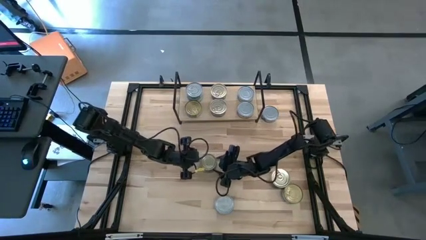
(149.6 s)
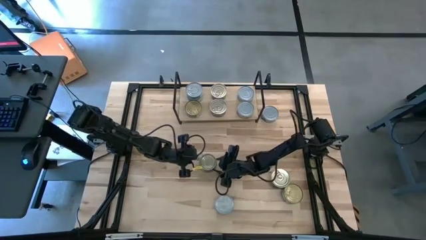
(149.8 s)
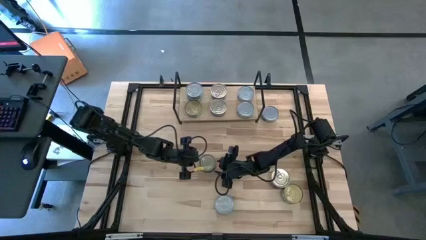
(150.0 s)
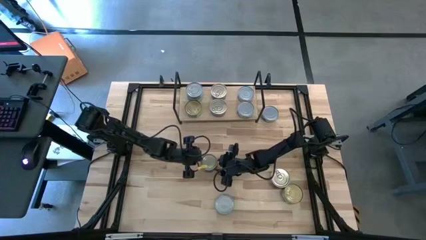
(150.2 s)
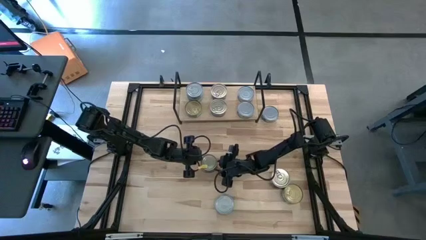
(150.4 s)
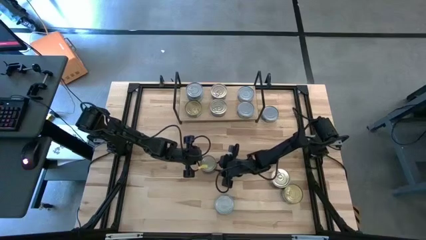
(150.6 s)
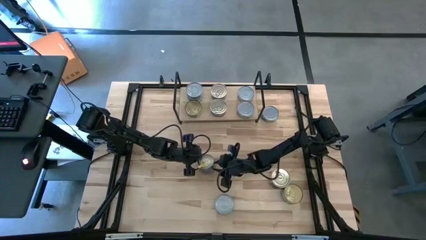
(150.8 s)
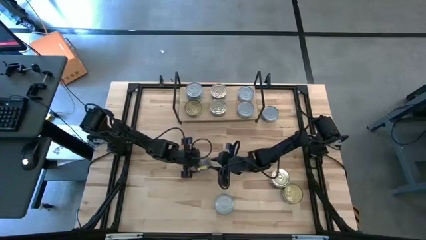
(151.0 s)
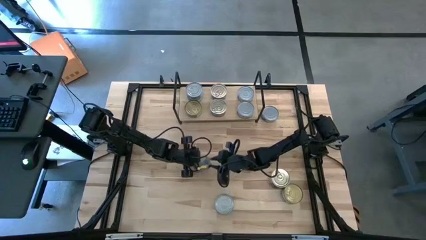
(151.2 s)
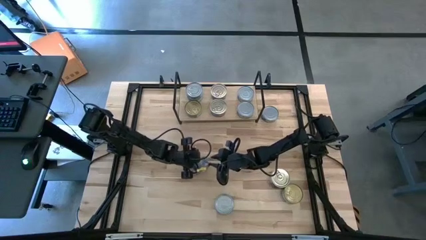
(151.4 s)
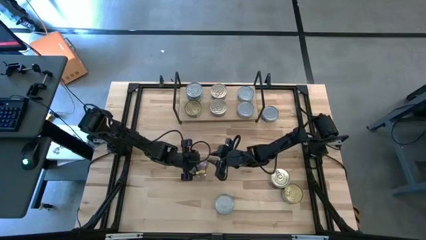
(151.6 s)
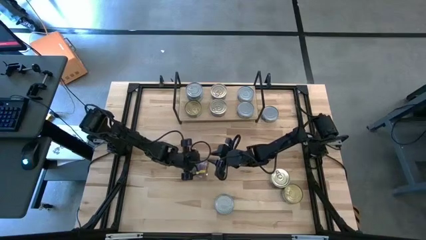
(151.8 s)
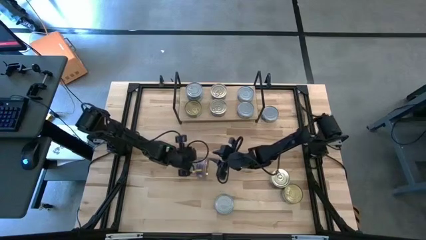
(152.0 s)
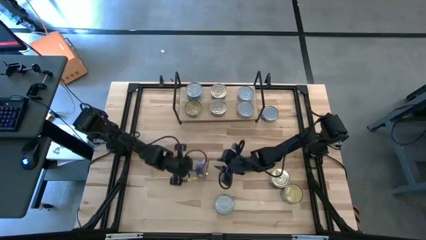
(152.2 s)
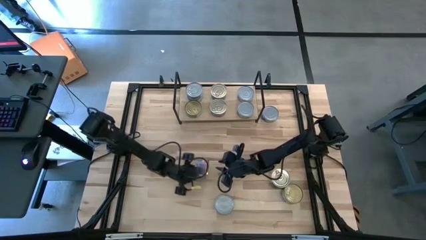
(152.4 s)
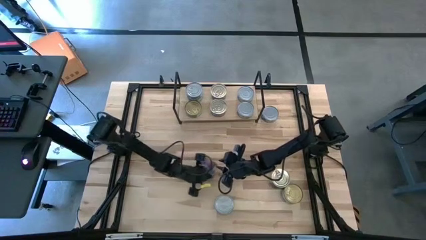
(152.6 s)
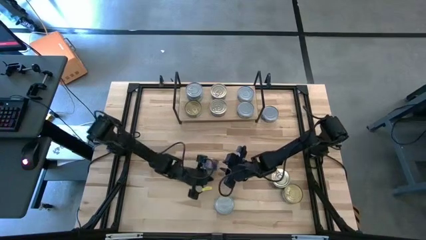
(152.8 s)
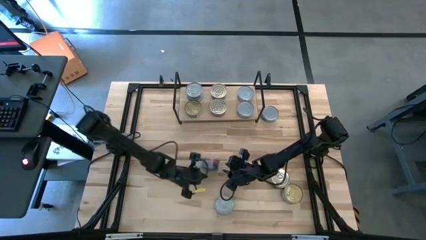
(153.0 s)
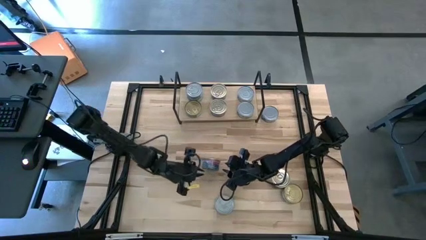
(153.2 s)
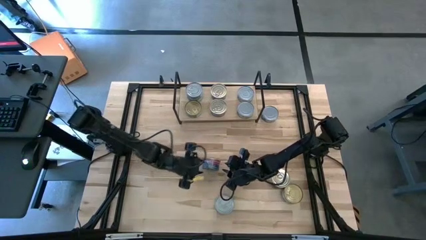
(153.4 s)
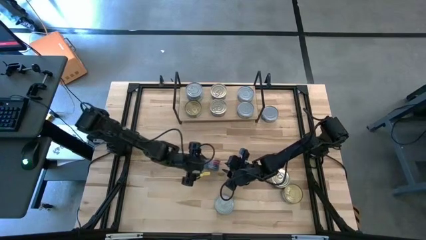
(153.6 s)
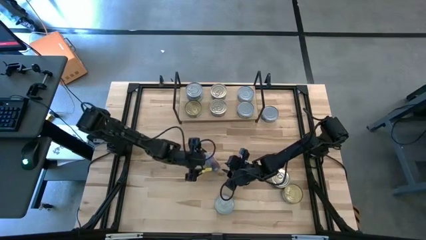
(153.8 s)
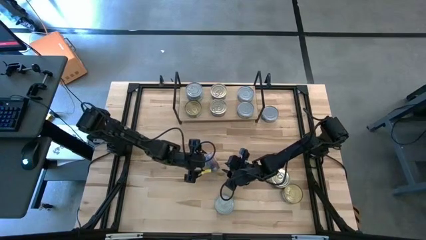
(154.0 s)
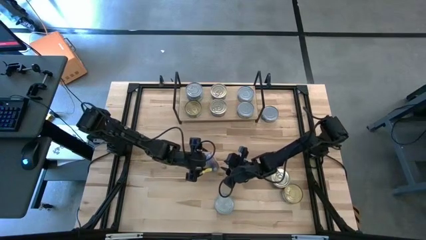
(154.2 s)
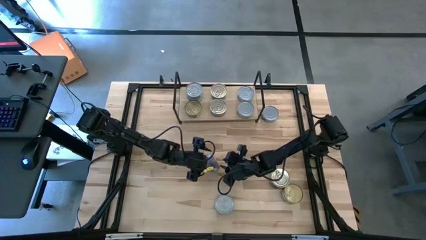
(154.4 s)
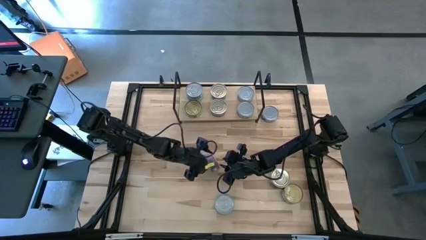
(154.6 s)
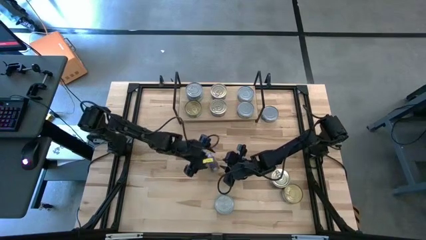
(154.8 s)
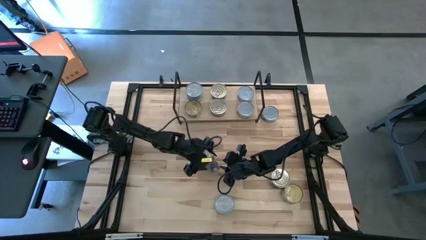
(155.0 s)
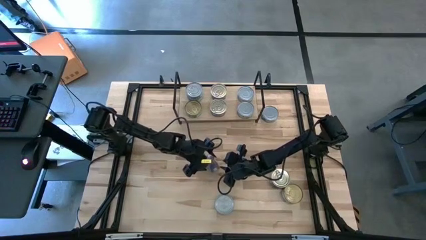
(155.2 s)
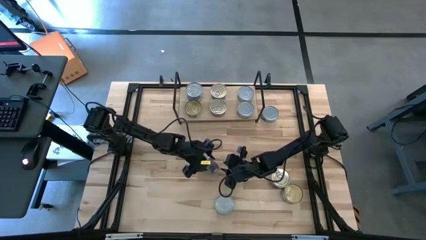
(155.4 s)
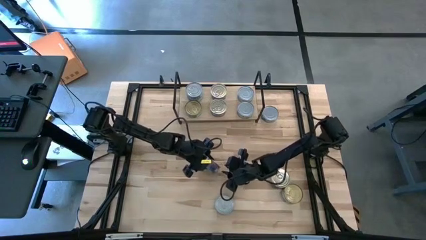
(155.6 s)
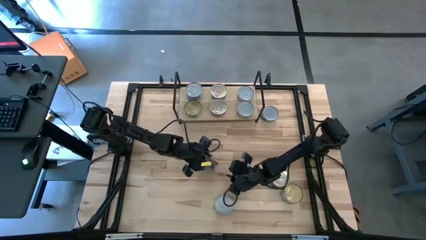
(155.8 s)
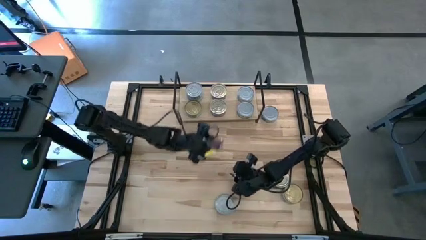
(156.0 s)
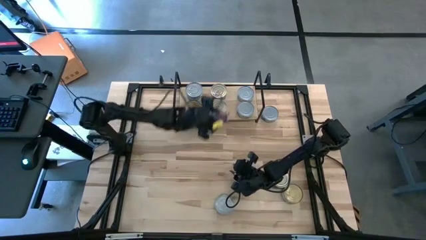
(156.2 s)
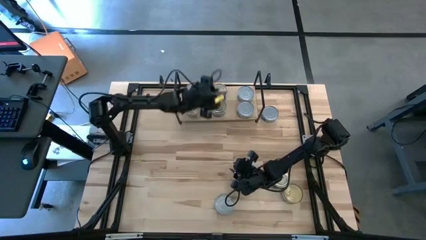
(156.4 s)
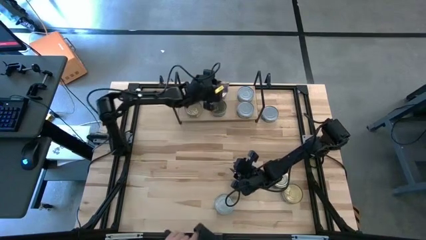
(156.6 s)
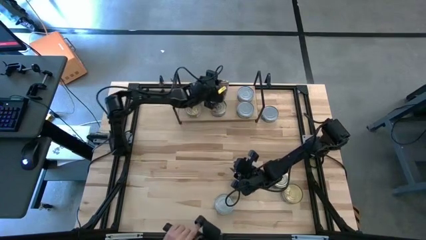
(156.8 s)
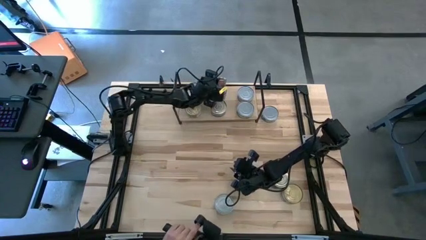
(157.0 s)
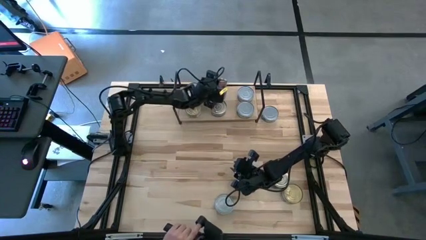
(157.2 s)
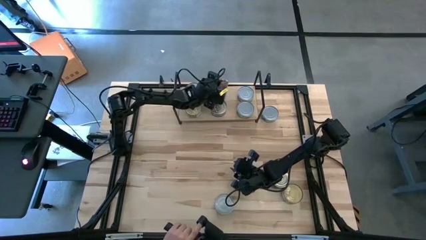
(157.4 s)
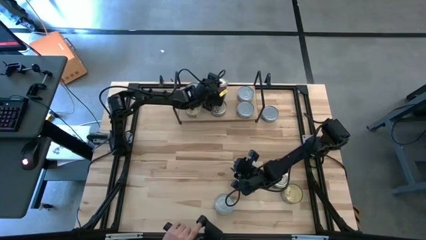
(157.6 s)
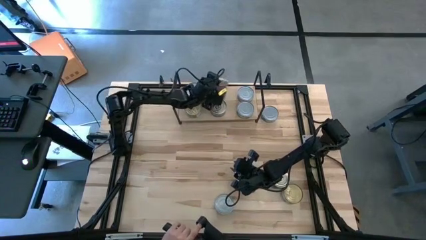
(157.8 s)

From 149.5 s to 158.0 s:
Task: Stack canned seafood by type on shelf
Stack the left blue tuna can on top of the blue tuna can on the back of the shelf

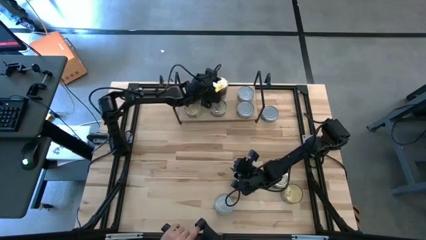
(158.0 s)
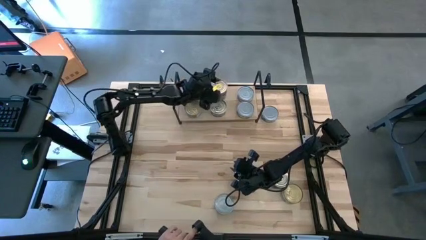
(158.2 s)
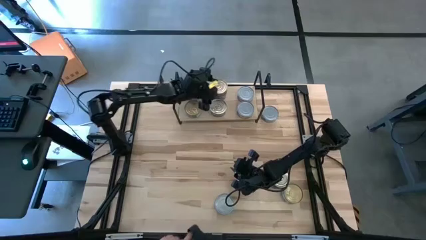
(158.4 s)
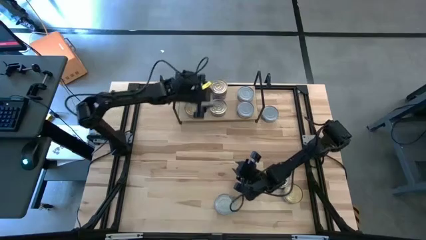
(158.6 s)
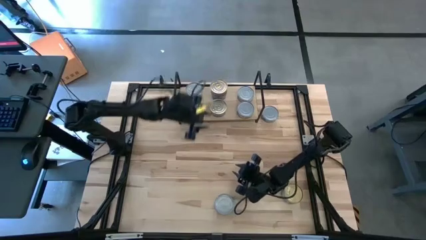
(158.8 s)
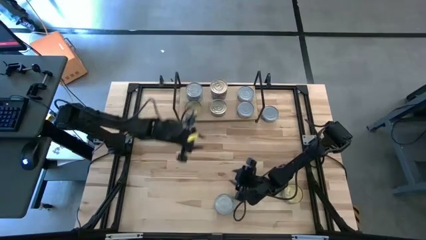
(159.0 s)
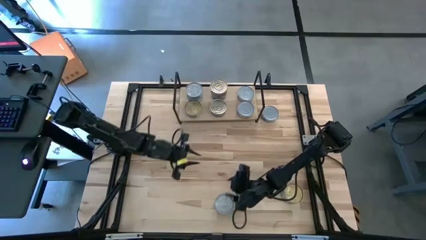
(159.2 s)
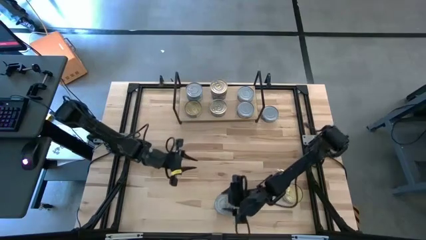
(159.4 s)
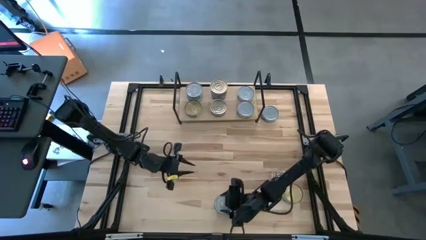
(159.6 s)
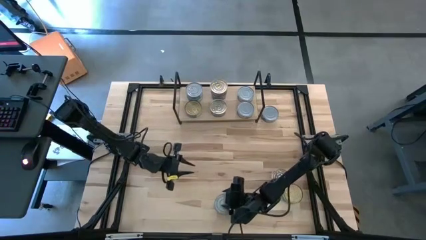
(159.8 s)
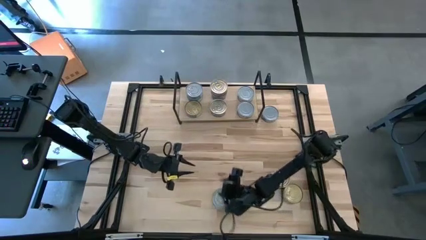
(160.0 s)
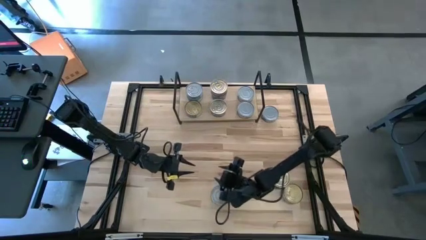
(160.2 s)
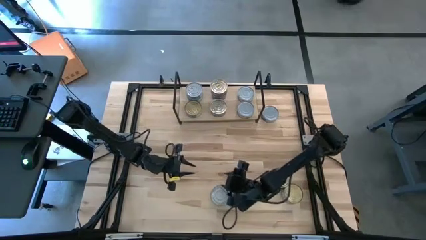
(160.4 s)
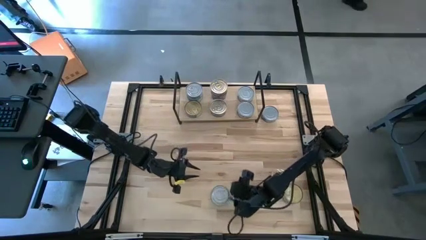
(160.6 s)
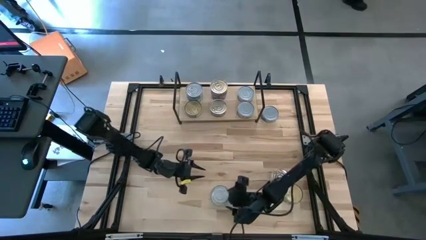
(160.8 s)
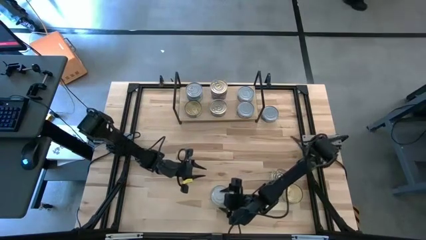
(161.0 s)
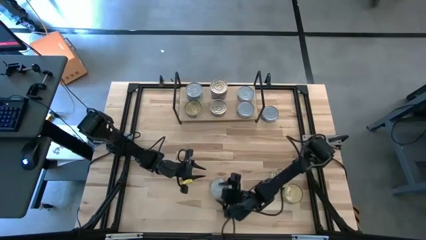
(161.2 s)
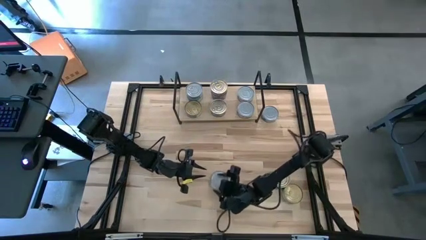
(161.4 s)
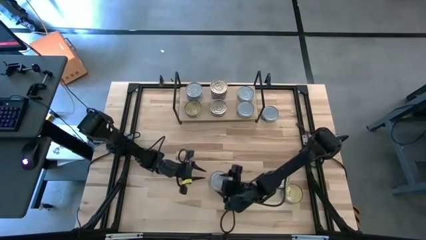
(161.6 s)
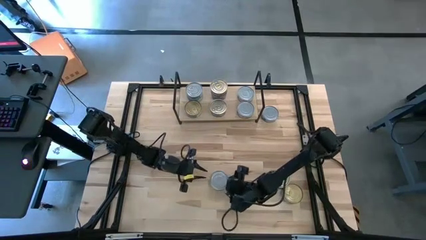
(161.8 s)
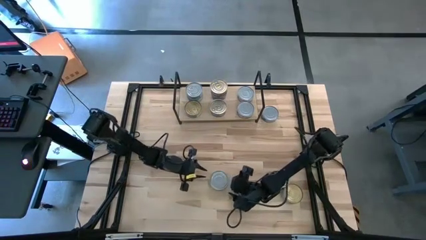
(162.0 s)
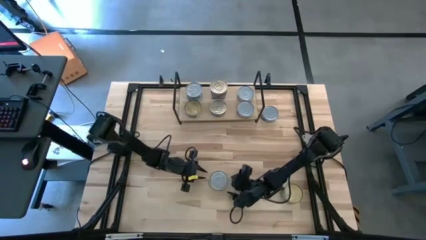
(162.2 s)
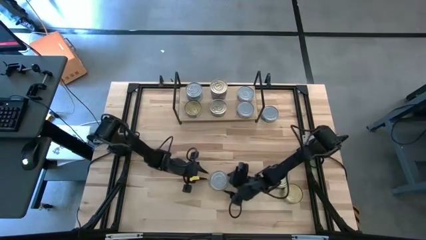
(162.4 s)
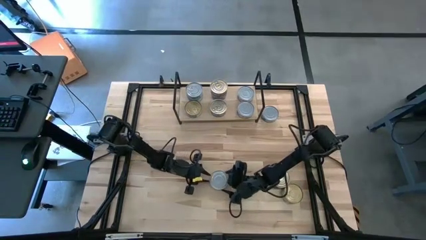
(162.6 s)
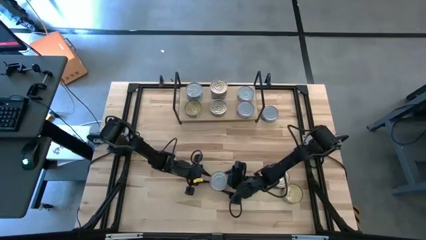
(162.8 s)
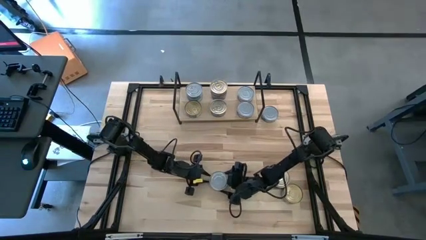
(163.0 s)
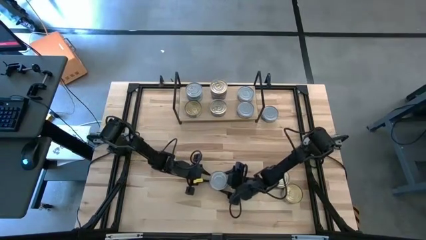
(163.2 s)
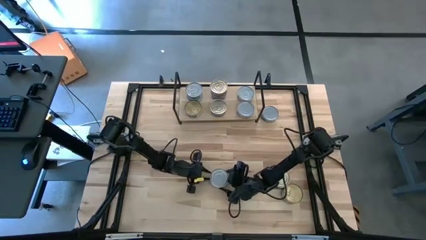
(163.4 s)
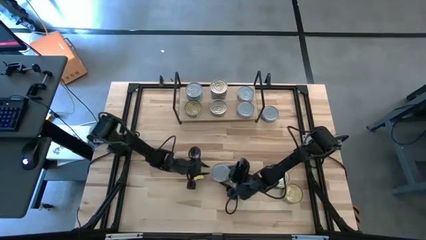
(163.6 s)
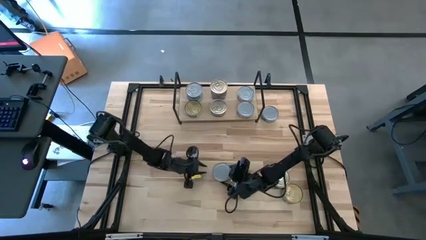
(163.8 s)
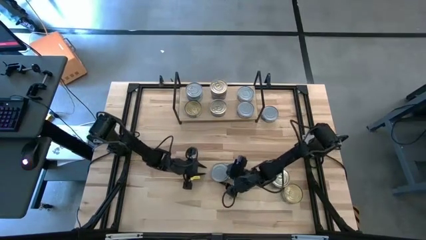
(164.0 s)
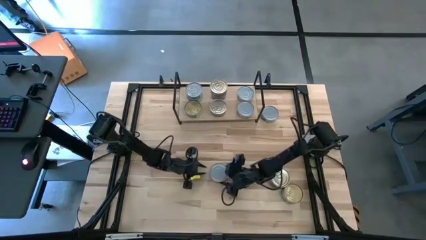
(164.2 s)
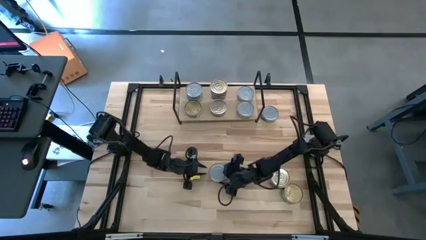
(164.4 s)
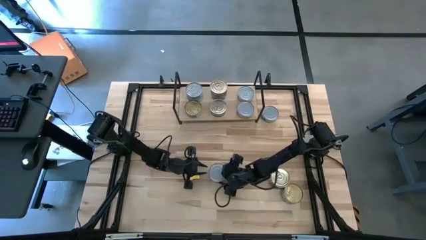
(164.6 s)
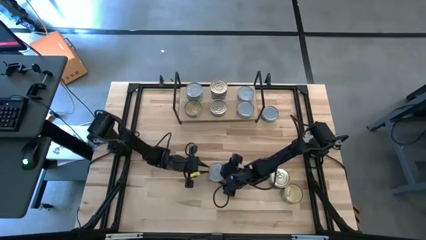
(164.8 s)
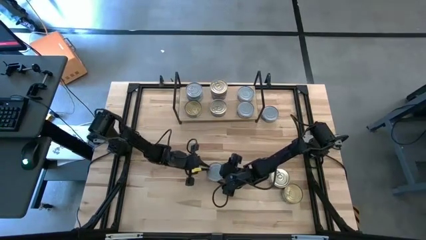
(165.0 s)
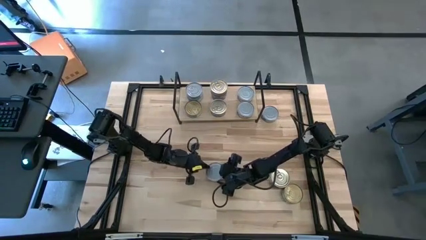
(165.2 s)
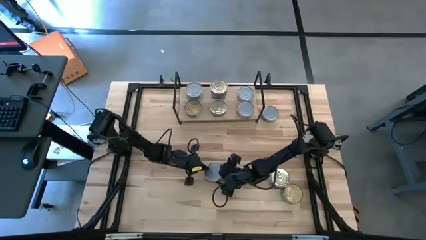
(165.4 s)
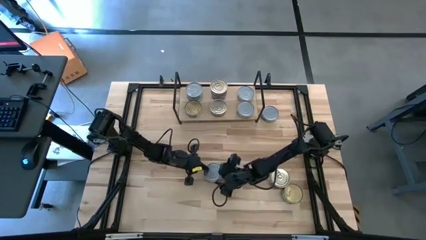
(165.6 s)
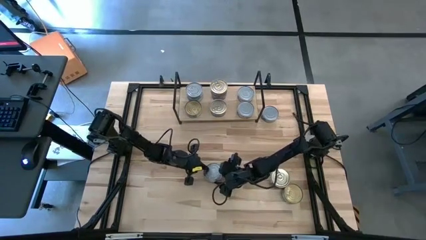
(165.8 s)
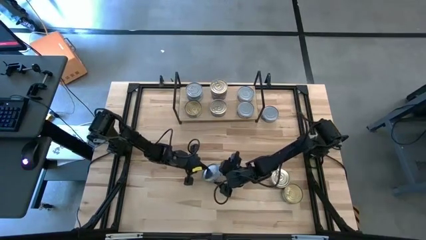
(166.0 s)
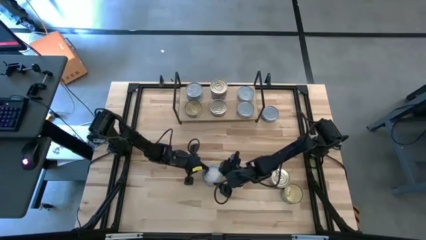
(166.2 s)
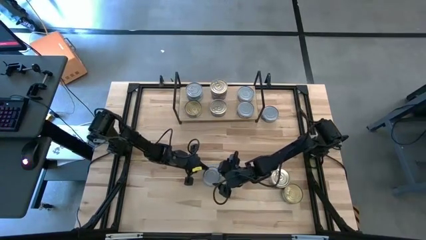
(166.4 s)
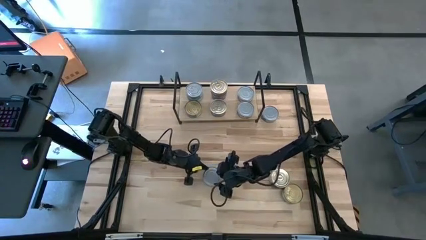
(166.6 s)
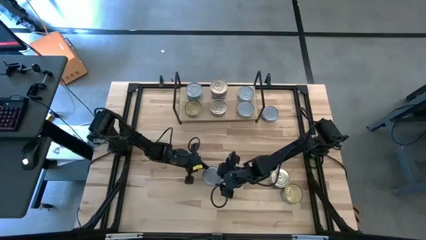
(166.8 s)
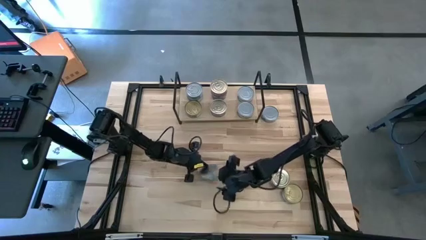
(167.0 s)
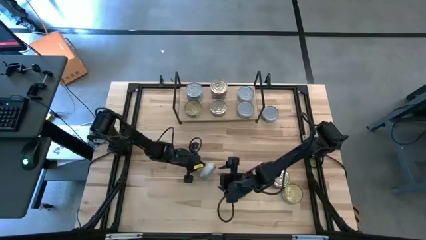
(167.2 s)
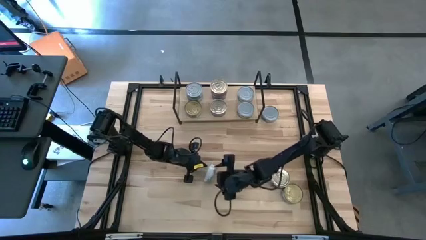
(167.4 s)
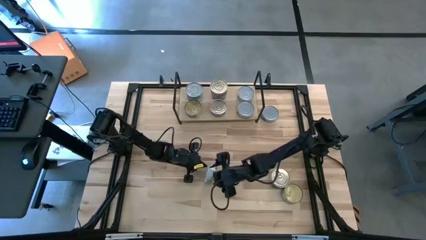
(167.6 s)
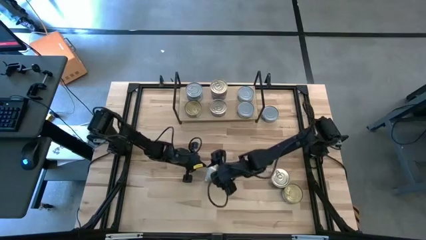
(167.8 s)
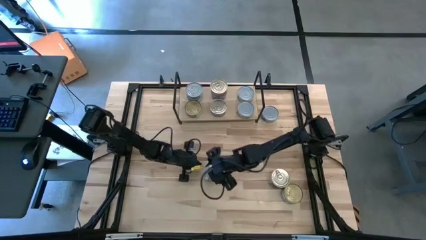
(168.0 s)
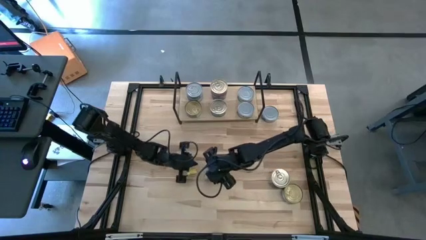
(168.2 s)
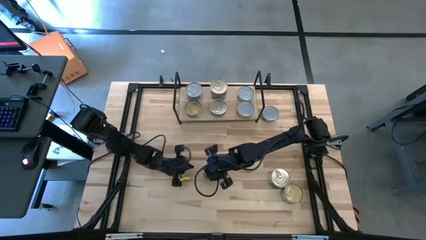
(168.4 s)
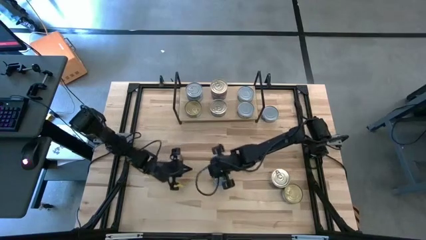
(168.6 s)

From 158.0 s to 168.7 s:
Stack the bottom green tuna can on top of the green tuna can on the shelf
